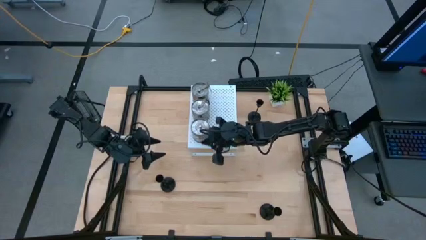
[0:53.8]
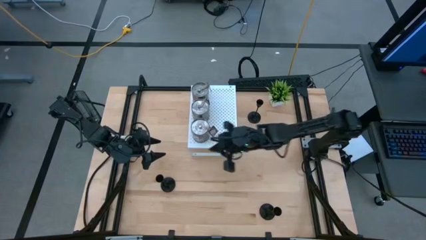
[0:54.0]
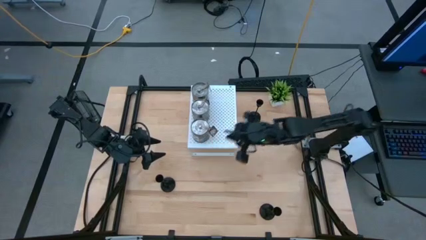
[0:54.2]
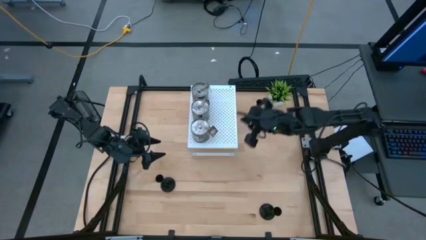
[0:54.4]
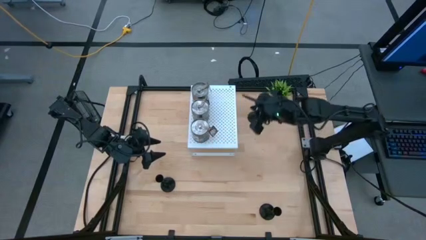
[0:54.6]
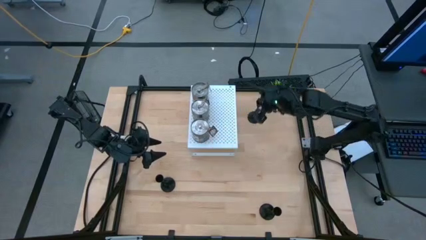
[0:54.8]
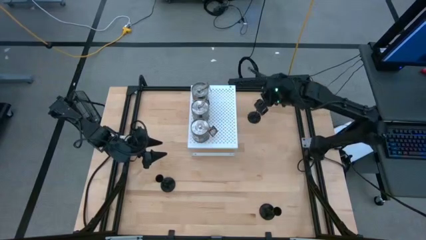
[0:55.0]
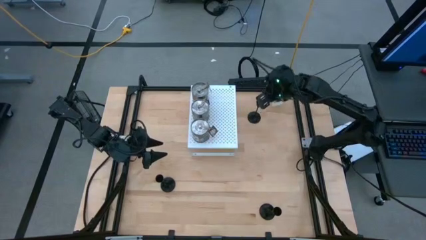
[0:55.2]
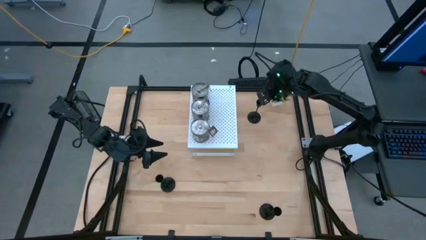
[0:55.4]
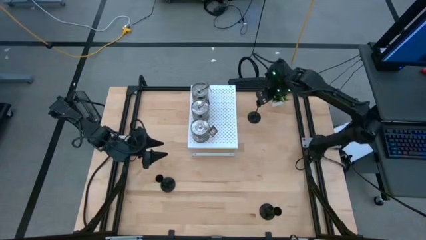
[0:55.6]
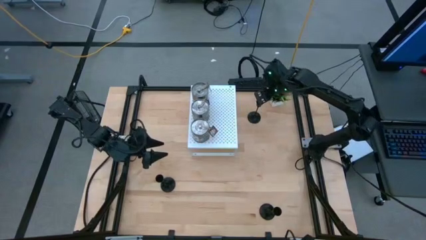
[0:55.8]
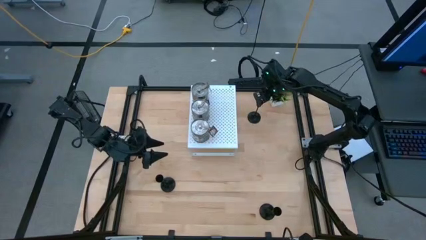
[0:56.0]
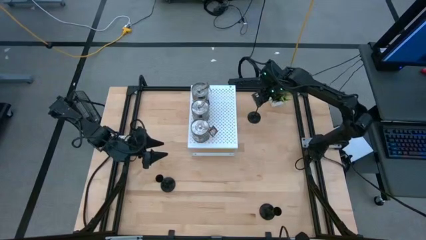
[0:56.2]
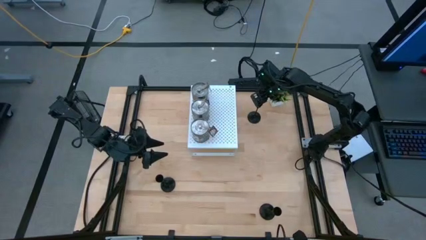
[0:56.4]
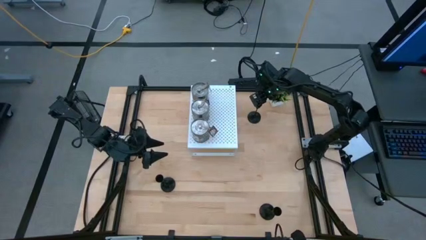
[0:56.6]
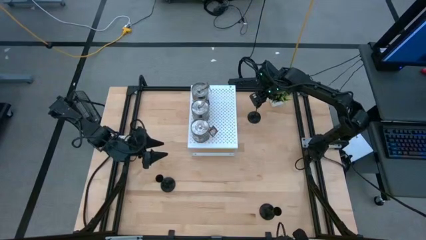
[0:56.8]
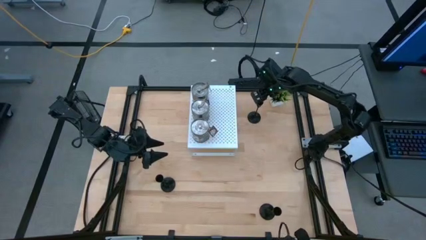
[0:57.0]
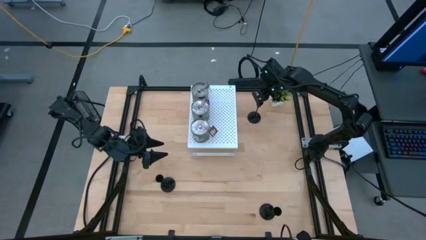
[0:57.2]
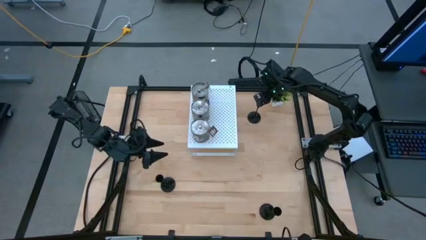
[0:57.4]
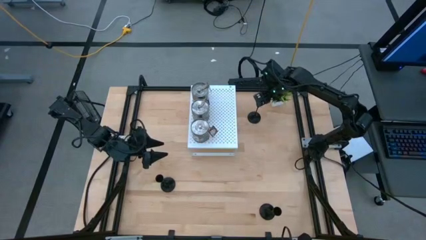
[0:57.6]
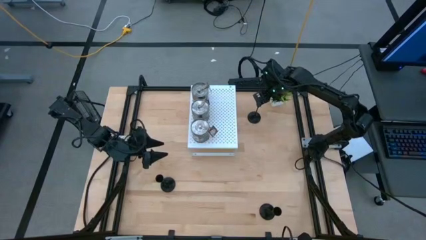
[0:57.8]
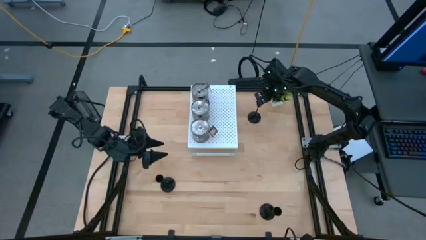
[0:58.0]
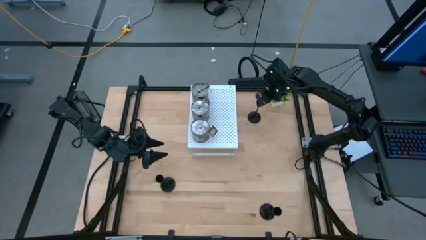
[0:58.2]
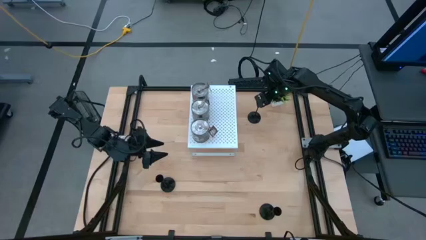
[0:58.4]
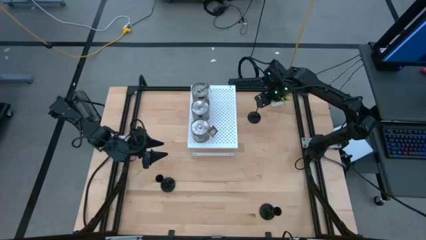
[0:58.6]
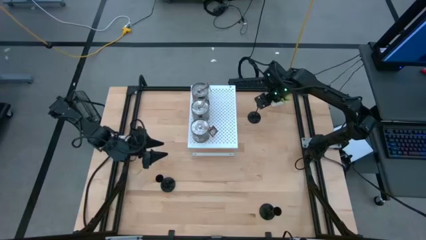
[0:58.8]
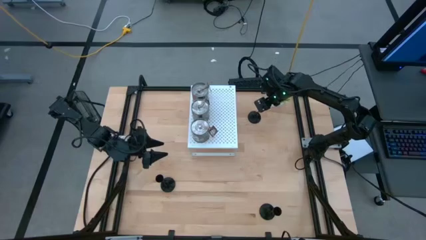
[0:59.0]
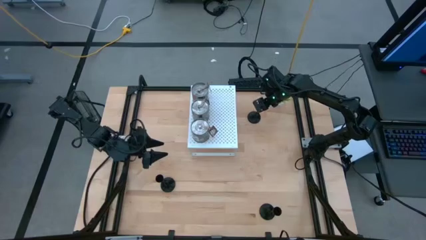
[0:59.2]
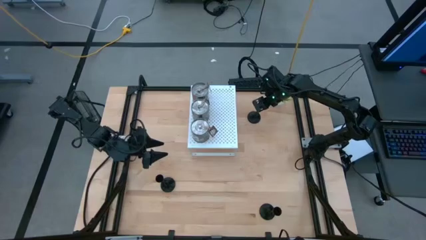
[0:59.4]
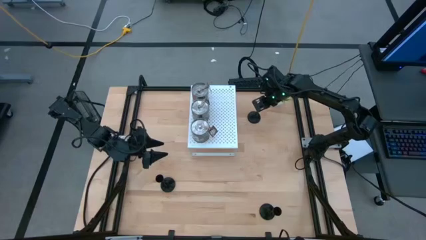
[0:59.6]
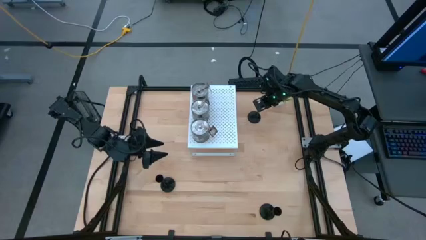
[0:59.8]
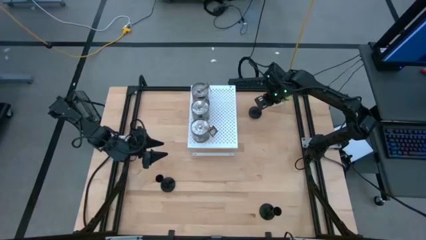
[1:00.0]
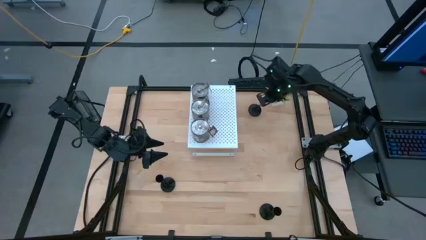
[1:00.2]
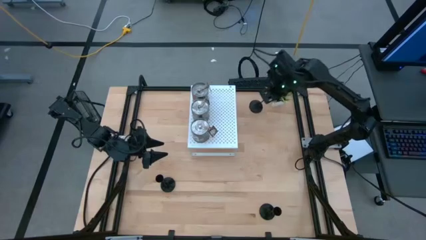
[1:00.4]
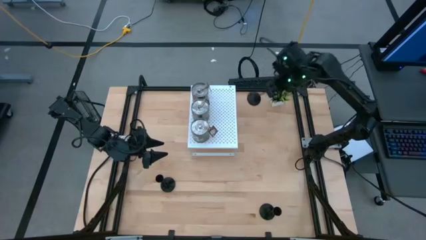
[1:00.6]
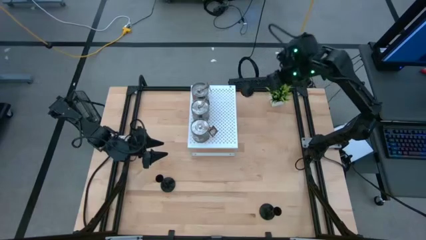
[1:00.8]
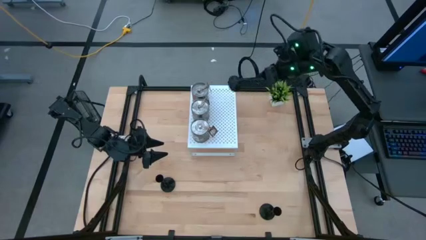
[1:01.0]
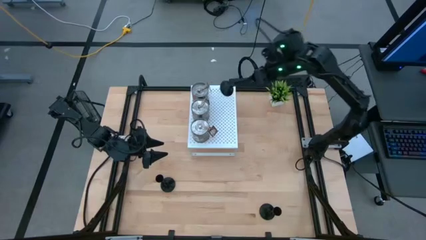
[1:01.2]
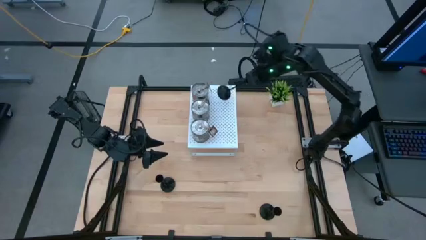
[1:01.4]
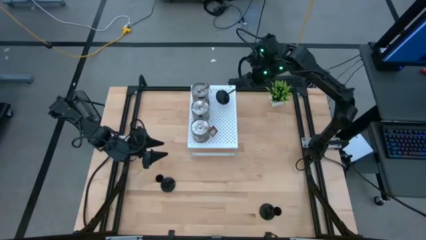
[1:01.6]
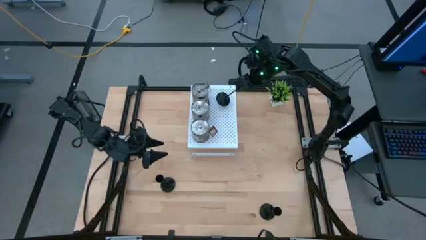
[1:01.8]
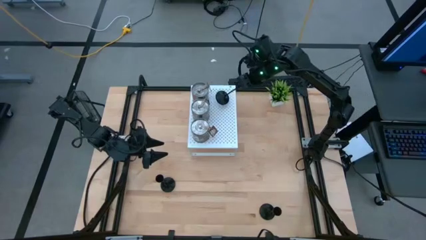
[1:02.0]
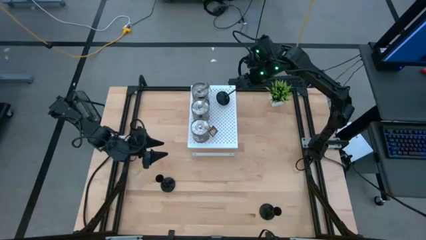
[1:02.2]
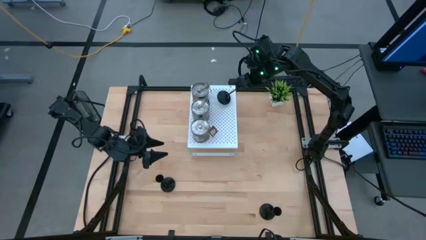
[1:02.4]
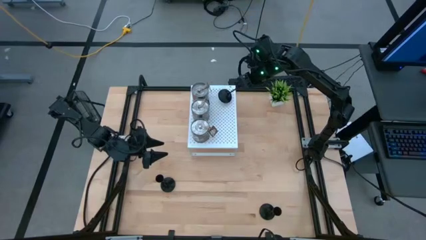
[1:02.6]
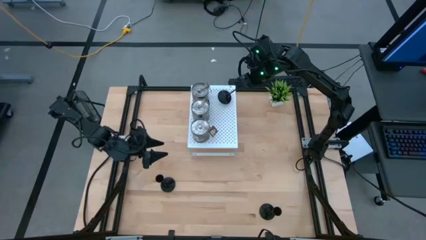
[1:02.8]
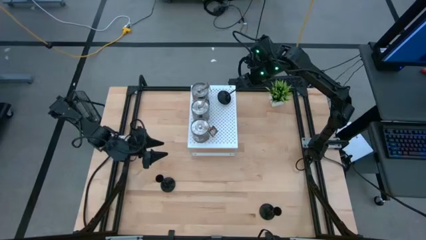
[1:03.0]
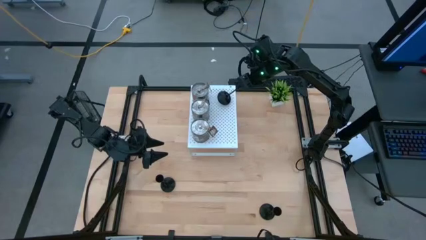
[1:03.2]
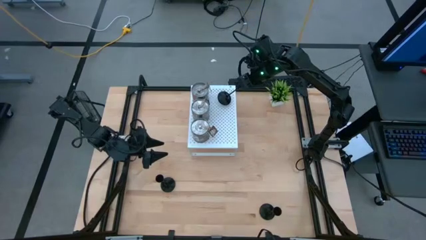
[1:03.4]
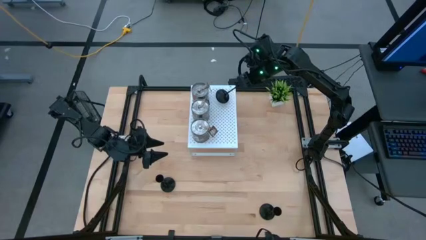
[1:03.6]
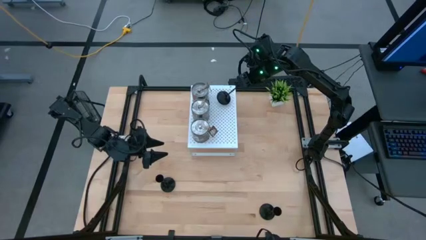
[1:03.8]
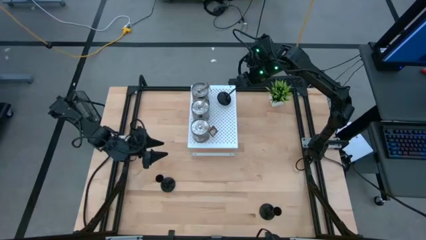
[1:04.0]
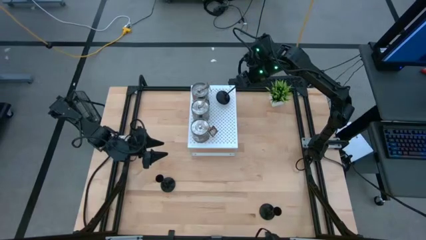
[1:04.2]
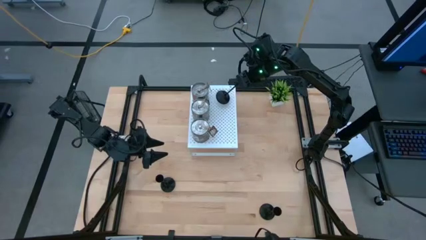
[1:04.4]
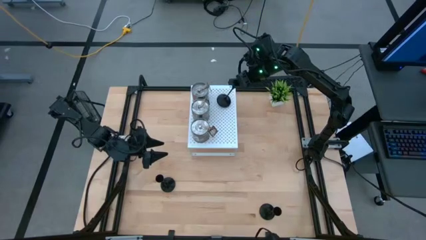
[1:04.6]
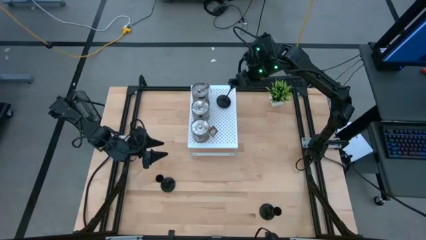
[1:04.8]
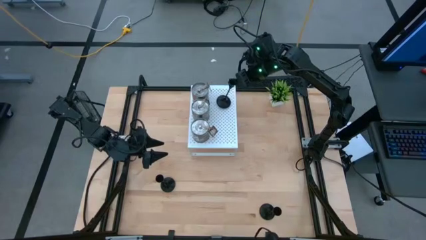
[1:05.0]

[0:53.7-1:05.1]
Task: Pick & Place candle stick holders
Put the top black candle holder on the shelf

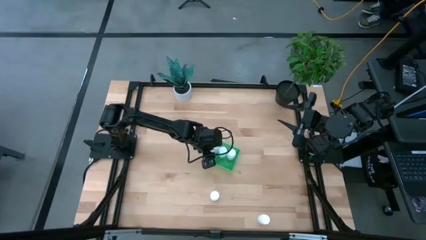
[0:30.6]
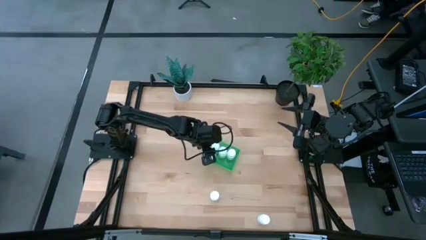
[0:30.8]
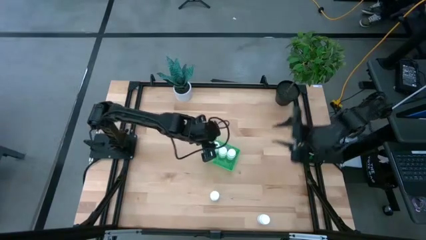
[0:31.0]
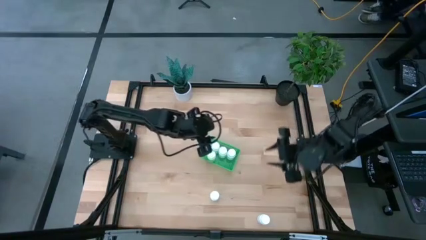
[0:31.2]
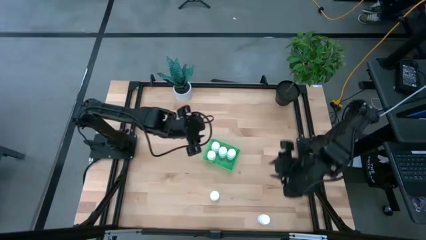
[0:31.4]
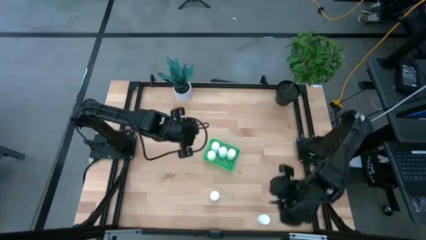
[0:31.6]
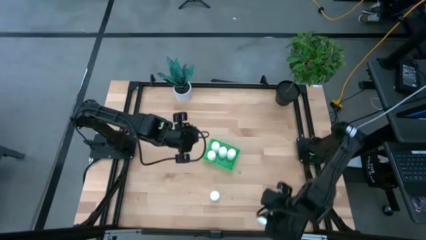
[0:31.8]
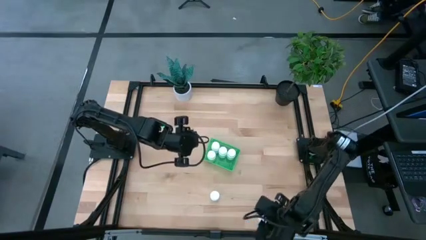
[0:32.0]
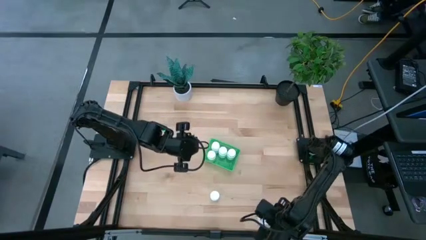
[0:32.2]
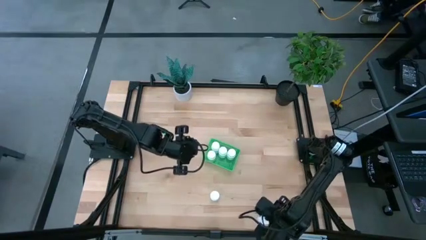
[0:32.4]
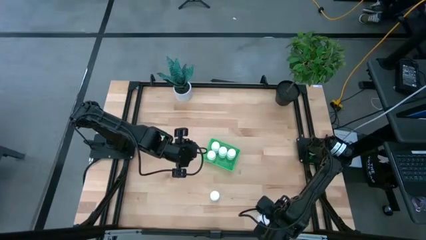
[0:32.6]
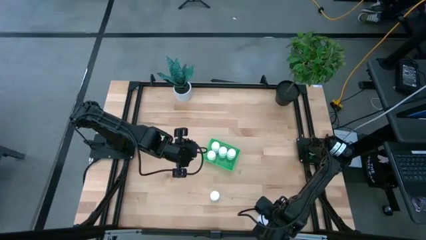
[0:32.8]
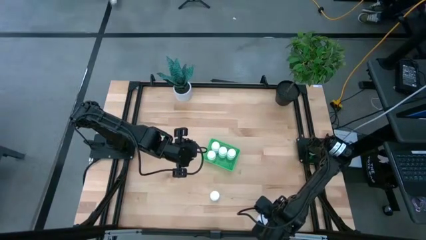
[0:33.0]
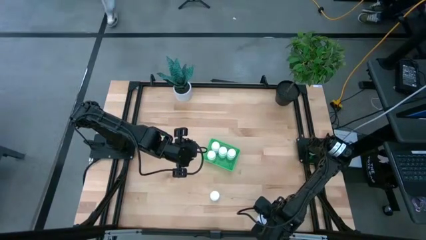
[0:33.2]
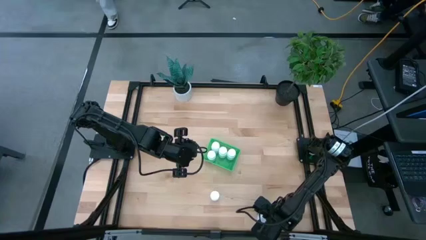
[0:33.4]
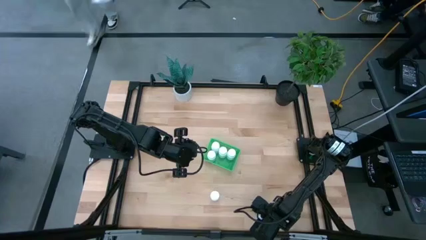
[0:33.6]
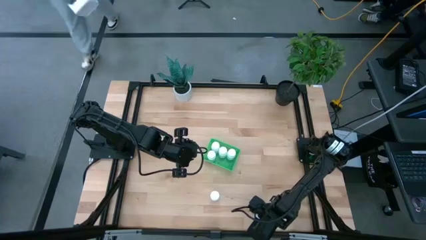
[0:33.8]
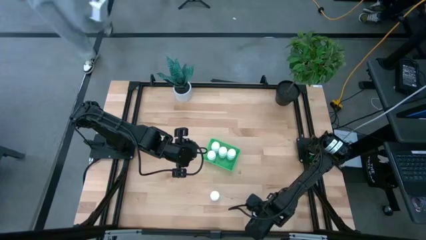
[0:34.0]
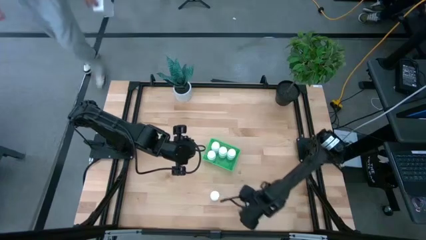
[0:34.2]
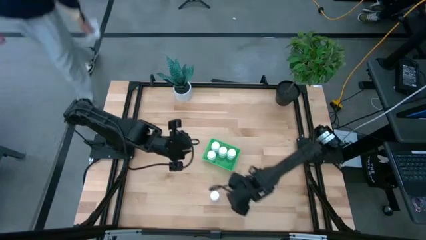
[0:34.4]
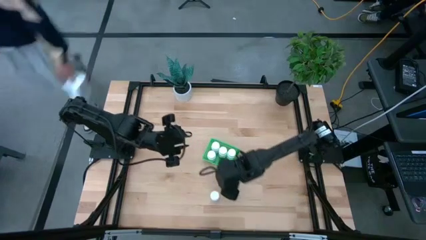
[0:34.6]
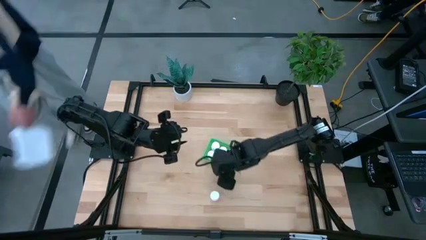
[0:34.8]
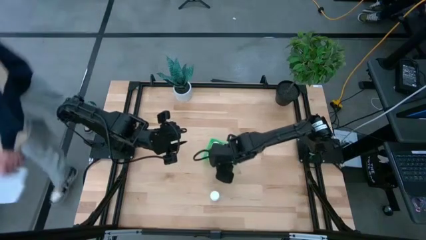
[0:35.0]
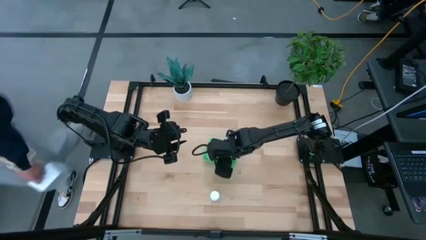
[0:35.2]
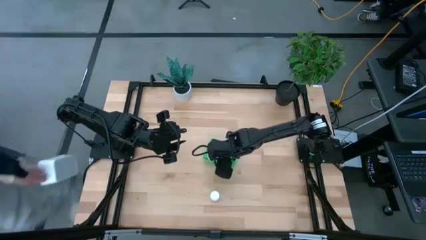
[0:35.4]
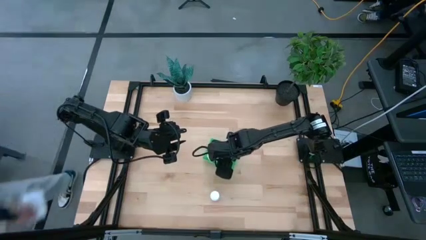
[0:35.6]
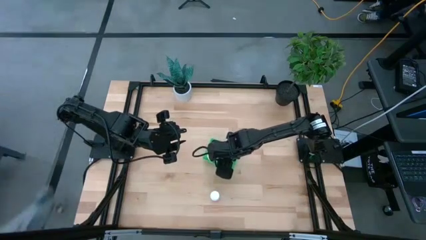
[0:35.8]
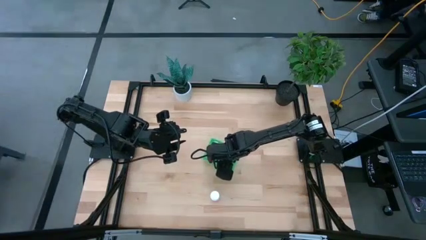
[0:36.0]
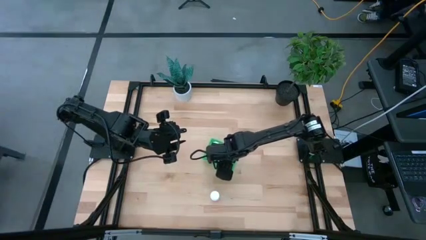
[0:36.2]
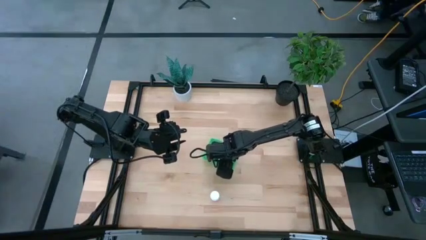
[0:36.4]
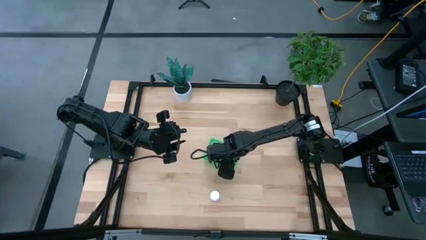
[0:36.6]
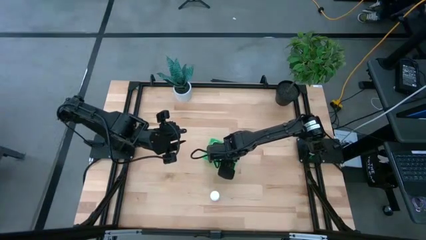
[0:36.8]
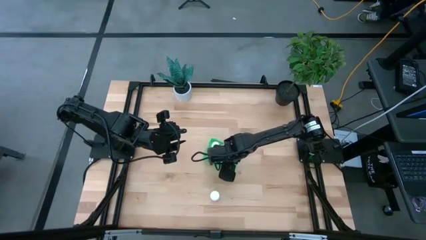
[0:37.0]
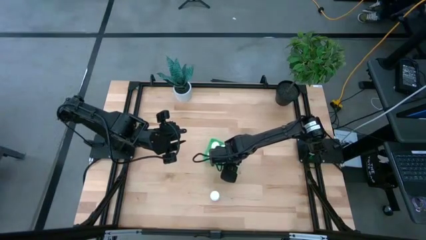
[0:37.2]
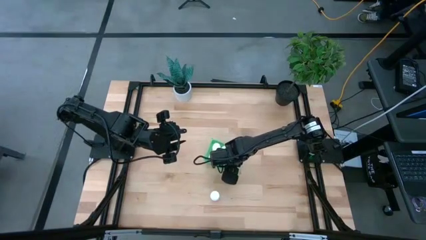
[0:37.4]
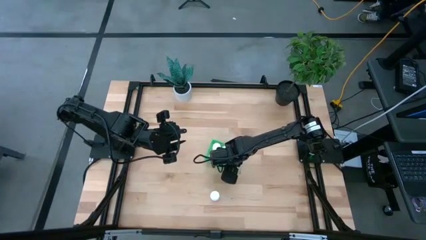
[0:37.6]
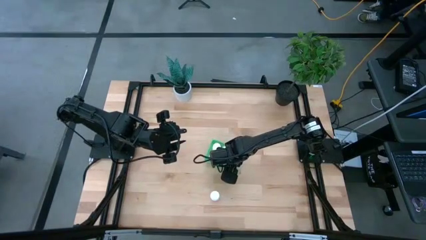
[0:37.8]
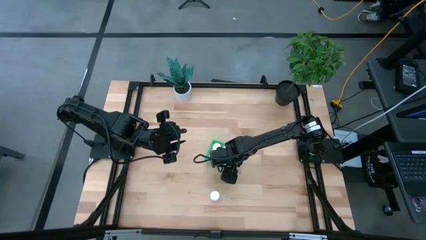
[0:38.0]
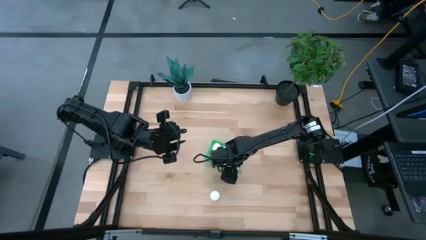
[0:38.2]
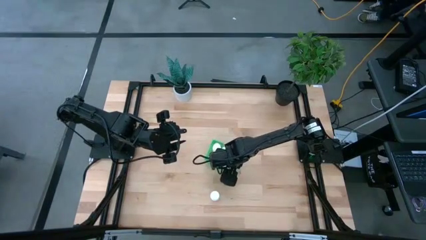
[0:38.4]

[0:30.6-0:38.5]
Task: Pick and place pill bottles into a basket
Put the white pill bottle into the green bin
